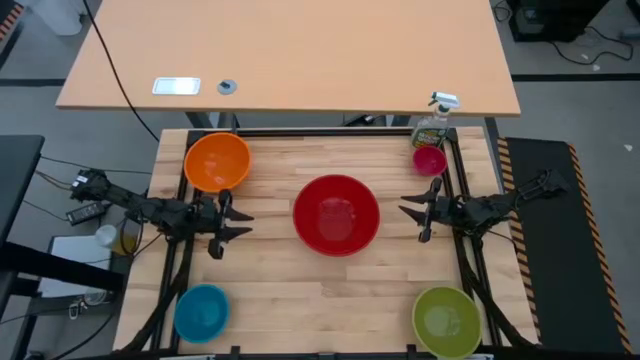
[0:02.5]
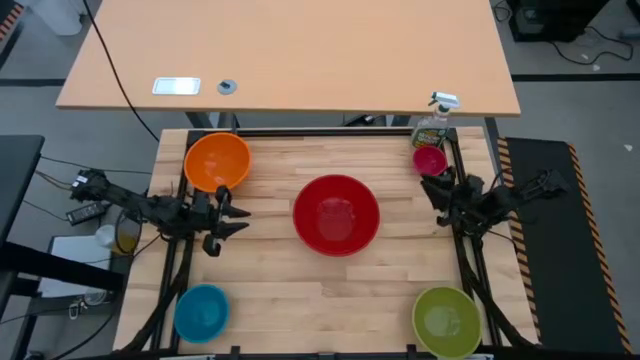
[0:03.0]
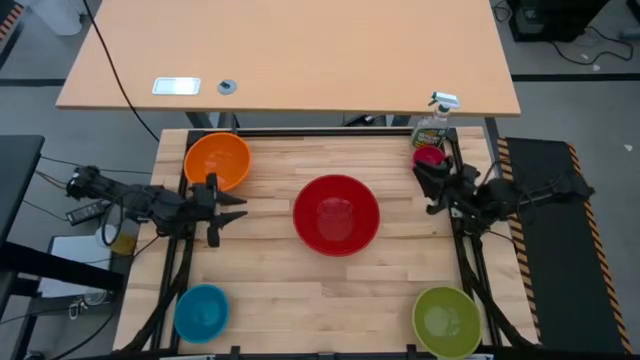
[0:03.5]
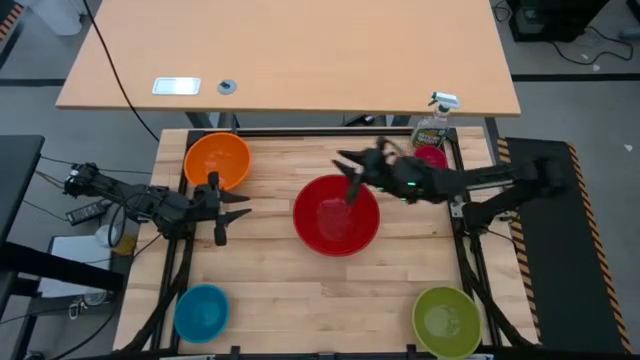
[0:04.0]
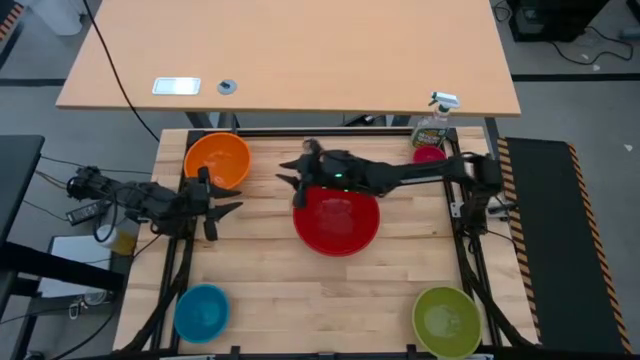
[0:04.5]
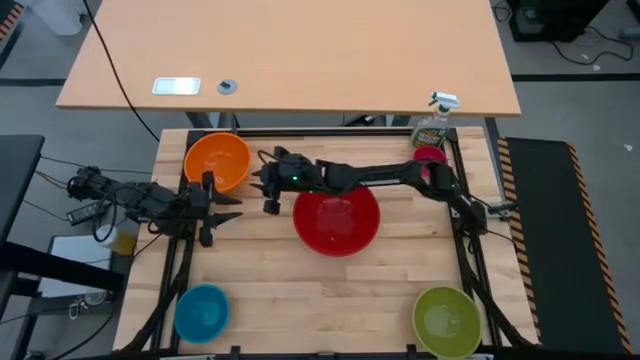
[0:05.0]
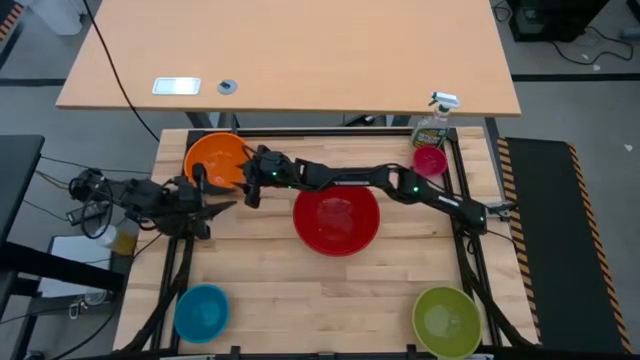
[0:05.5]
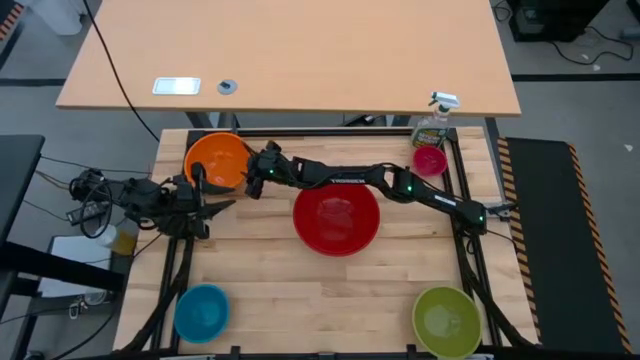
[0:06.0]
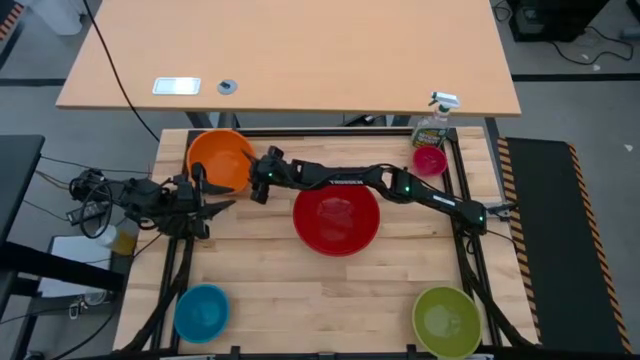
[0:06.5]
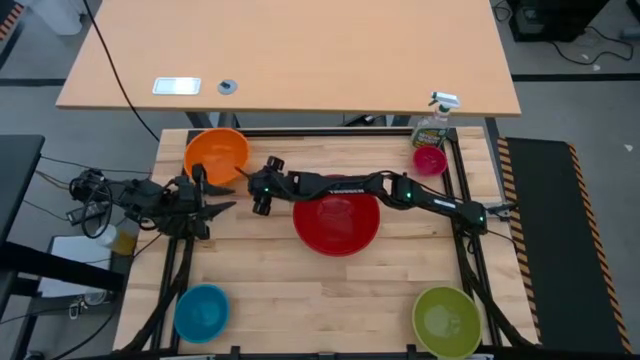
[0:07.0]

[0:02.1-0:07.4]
Stack the orange bowl on the red bowl

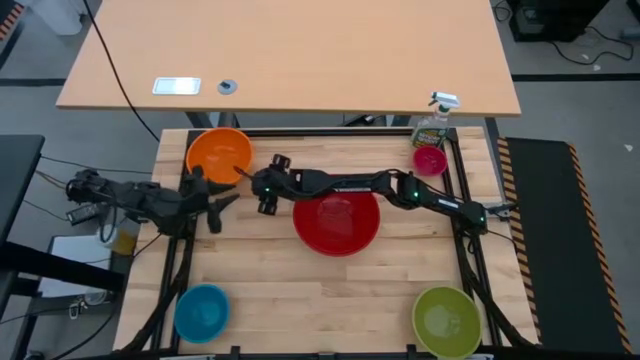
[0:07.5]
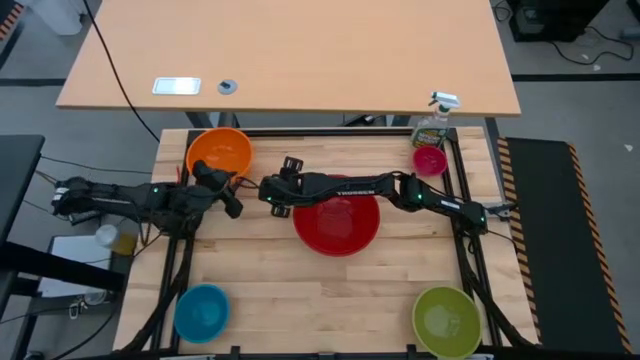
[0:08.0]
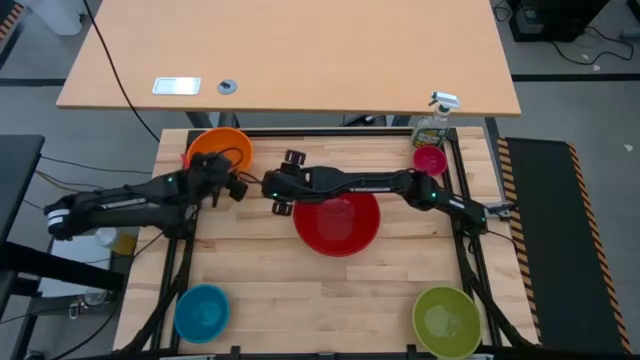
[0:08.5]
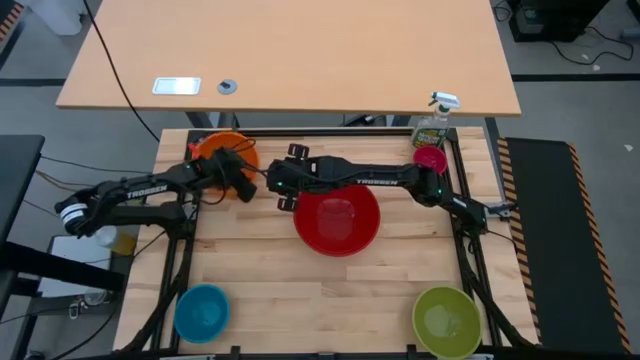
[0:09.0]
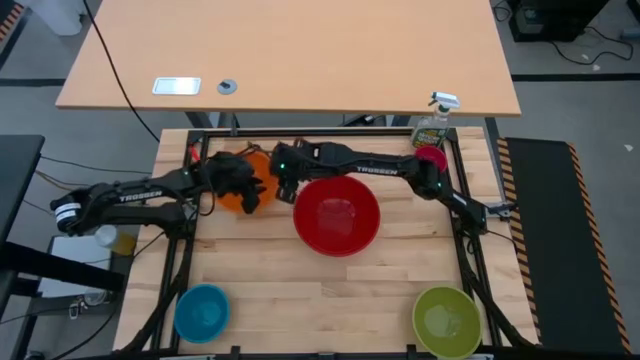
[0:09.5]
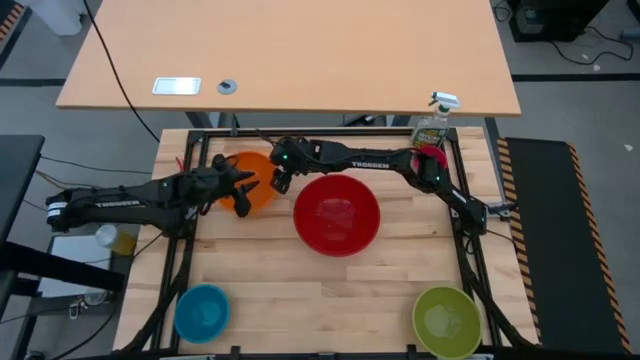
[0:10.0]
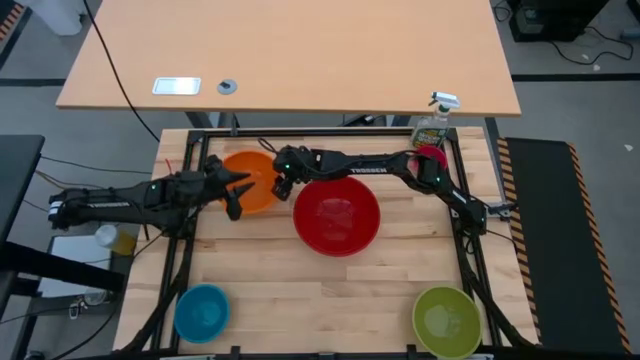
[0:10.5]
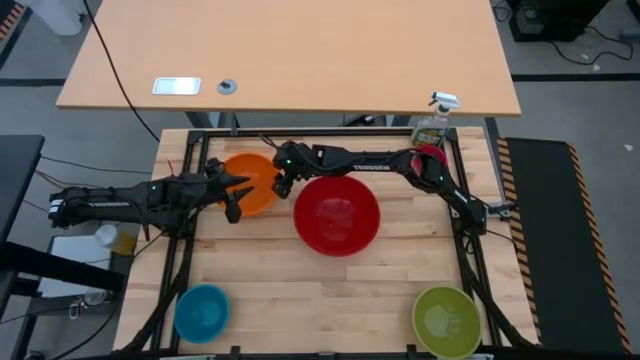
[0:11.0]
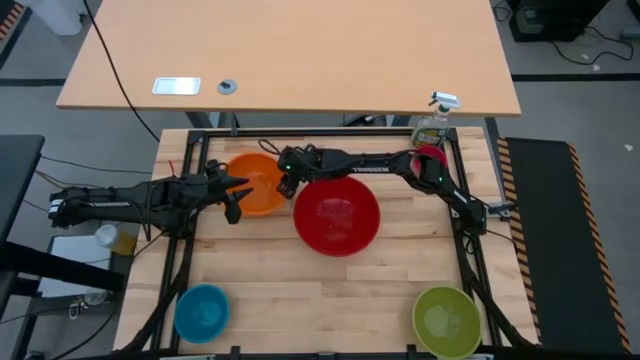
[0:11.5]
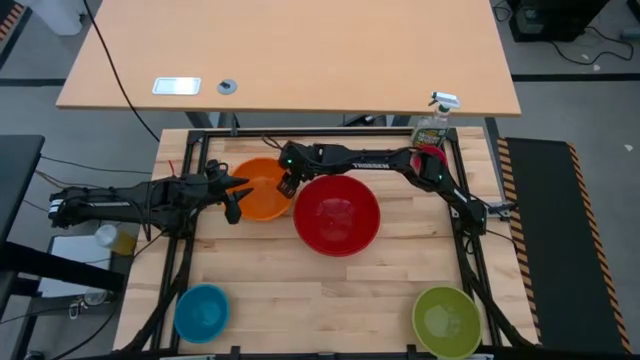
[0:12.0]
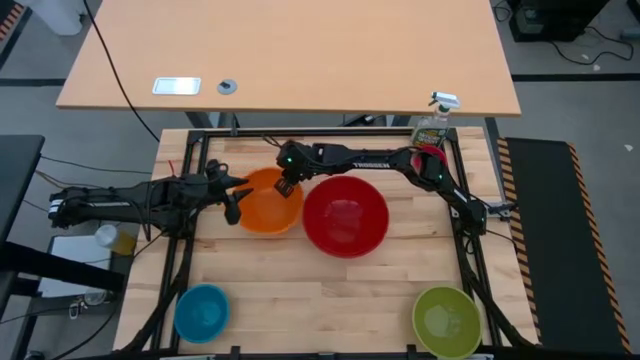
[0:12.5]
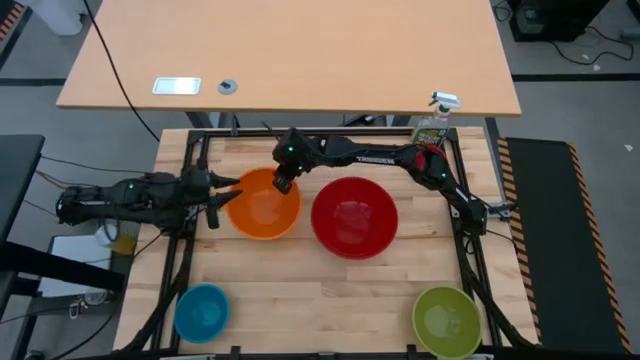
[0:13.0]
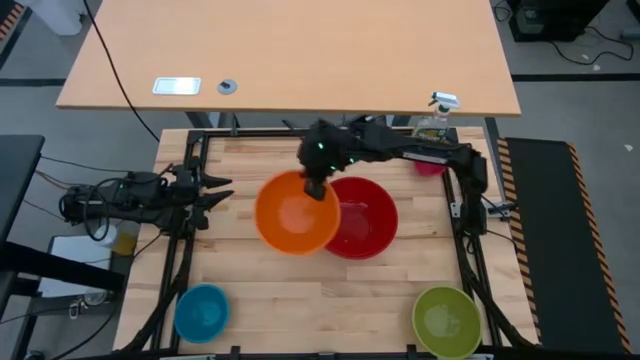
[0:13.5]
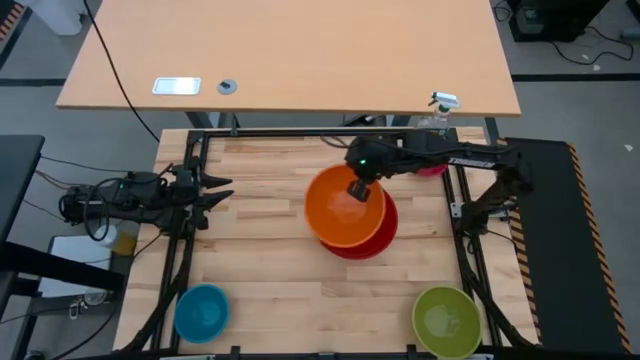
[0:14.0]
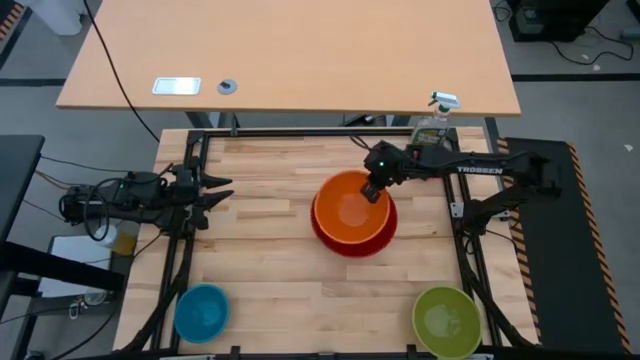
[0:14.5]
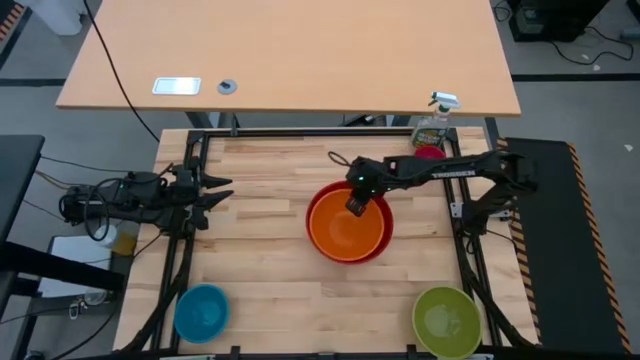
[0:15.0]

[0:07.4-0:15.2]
Stack the orange bowl on the red bowl

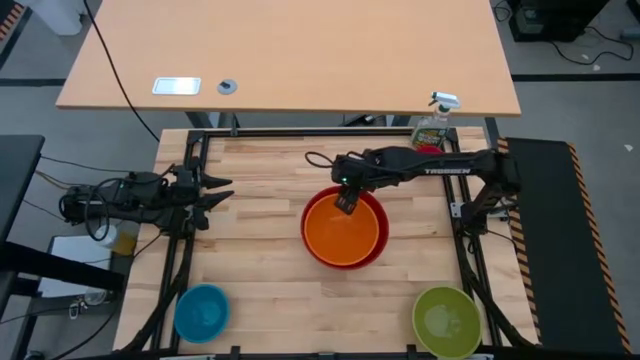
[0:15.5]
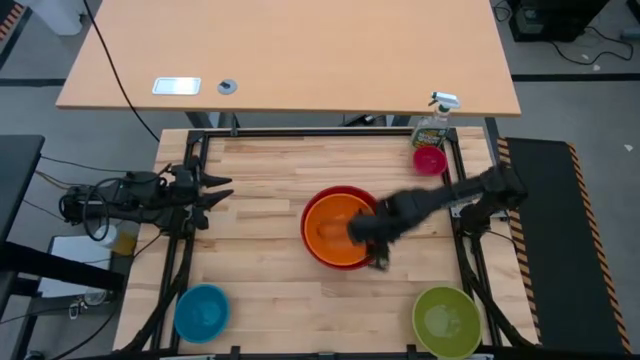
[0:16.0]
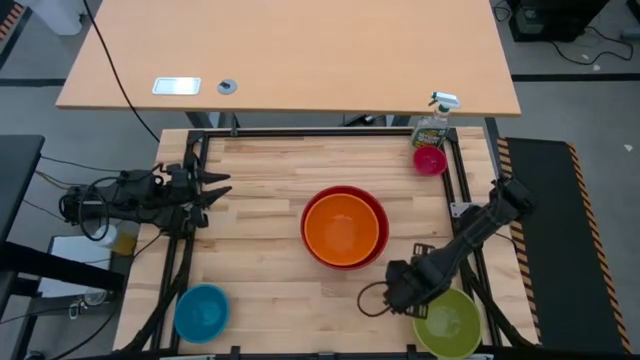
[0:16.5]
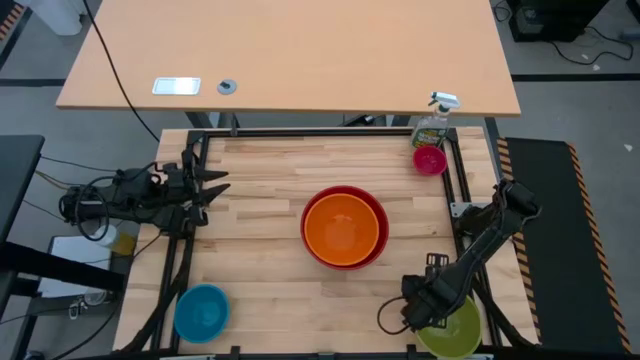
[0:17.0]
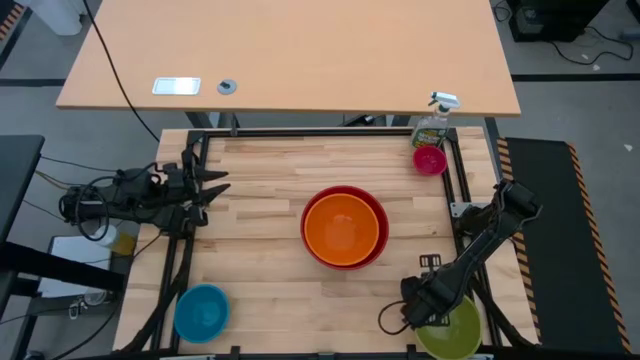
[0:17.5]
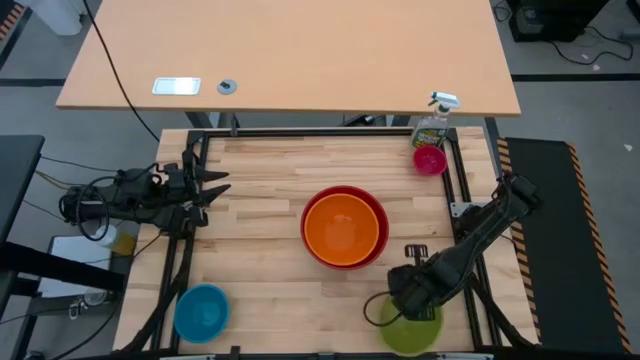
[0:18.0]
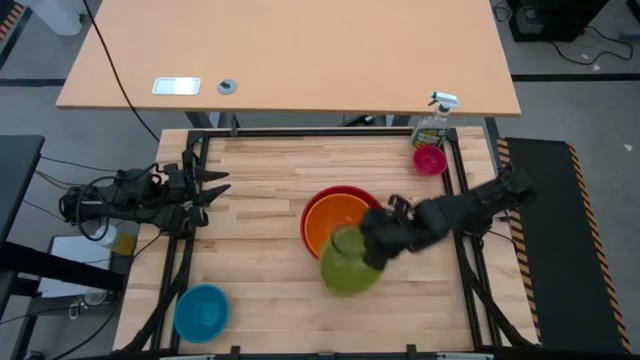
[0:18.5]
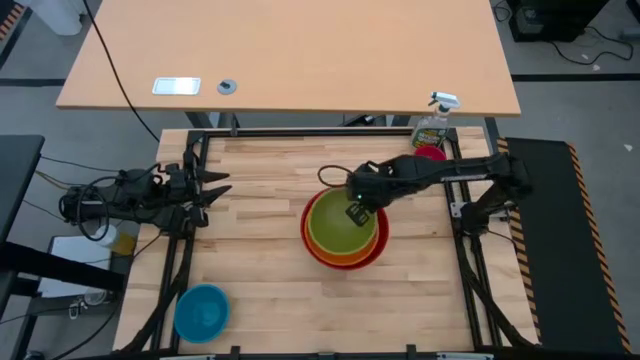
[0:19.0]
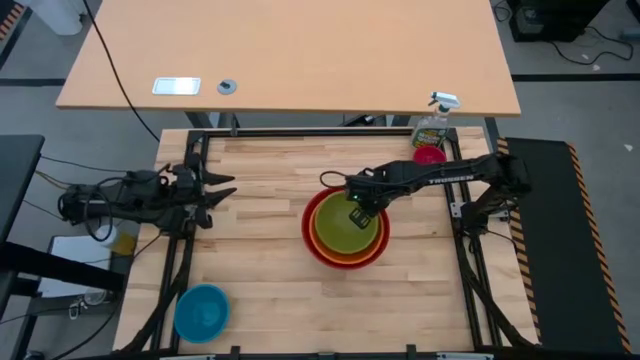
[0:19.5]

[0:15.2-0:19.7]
Stack the green bowl on the orange bowl

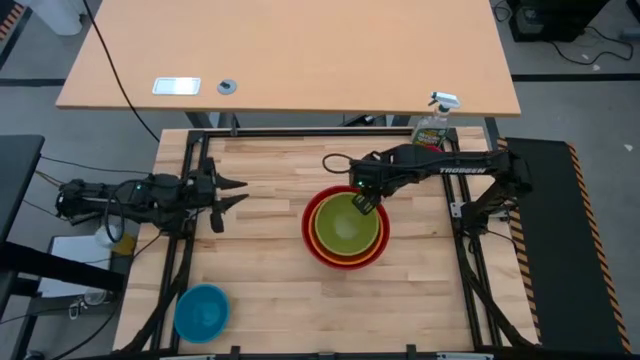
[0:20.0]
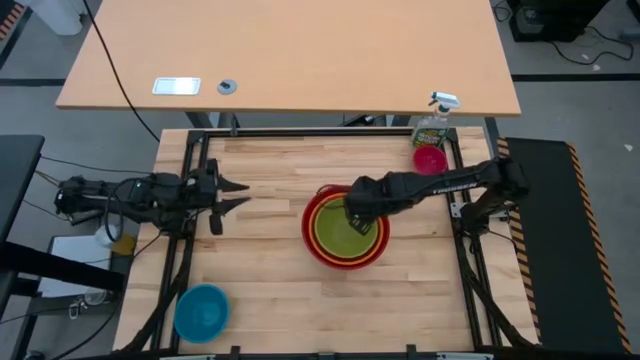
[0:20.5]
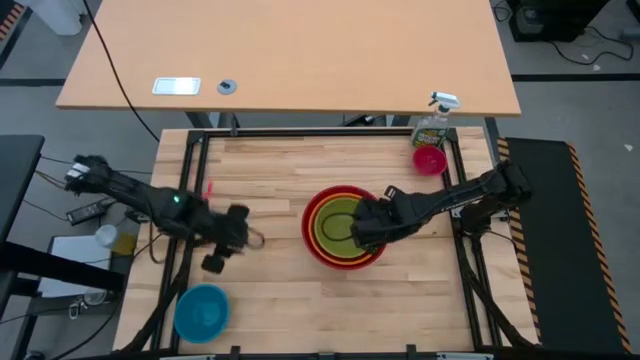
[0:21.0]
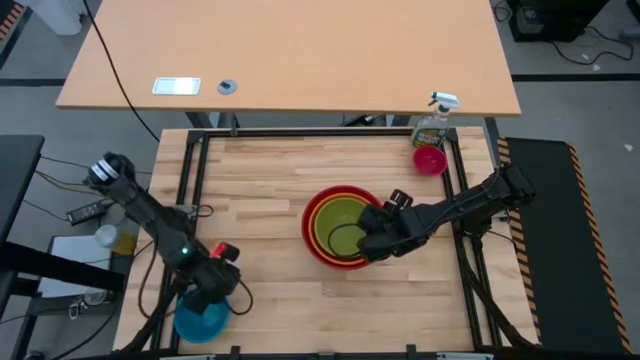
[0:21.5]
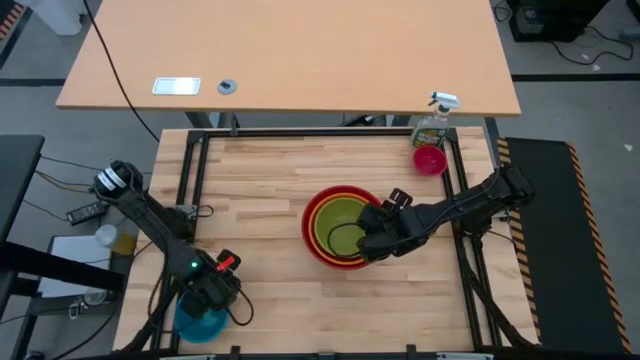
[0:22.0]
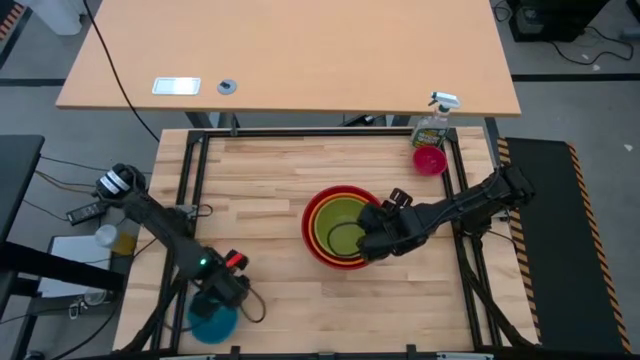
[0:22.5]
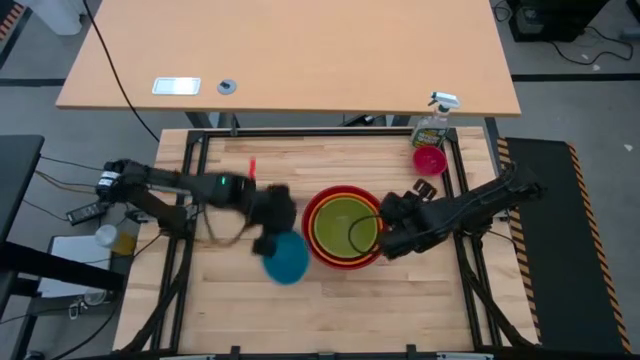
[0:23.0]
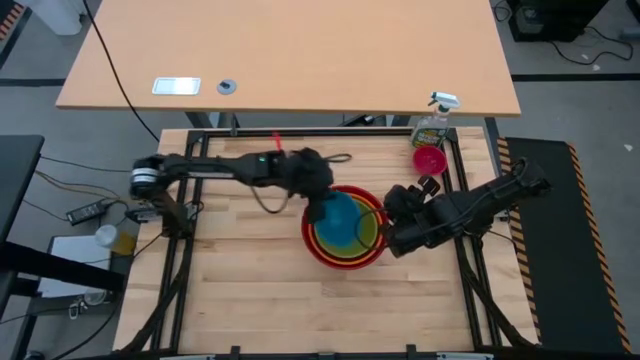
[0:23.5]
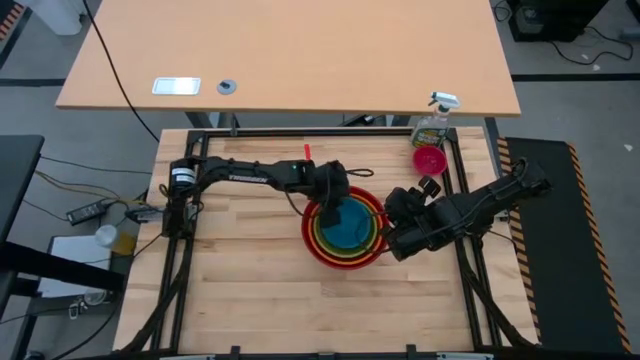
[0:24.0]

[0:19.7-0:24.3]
Stack the blue bowl on the green bowl
